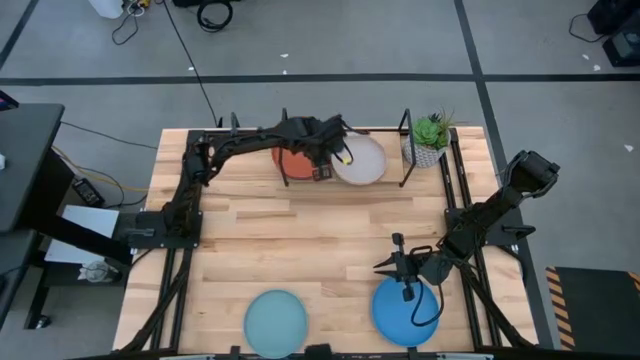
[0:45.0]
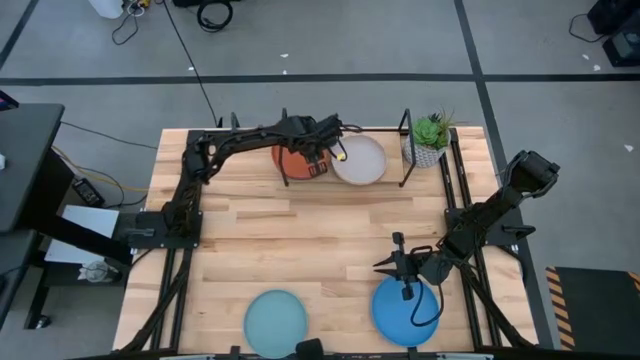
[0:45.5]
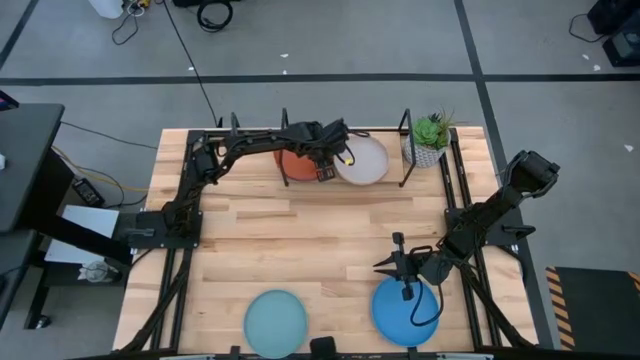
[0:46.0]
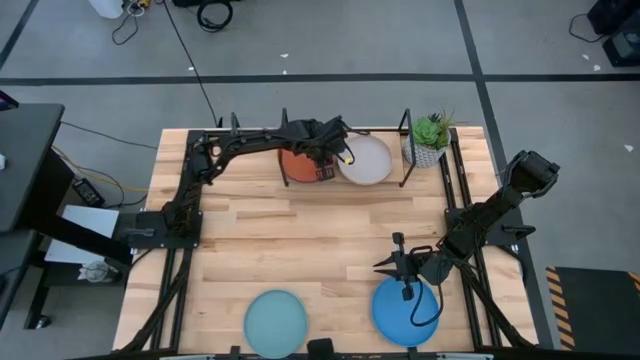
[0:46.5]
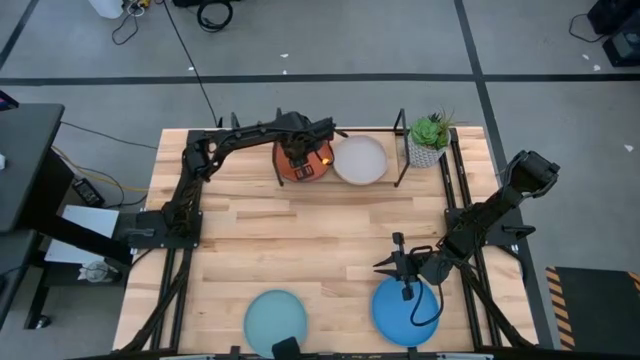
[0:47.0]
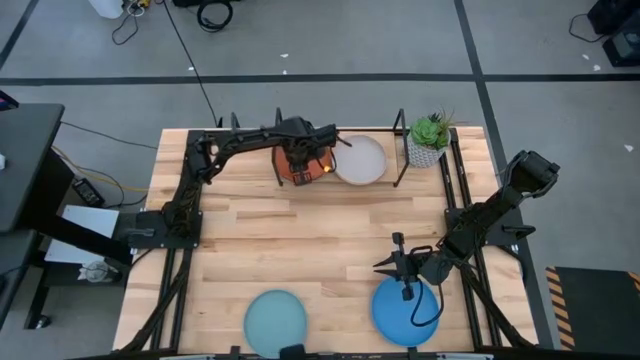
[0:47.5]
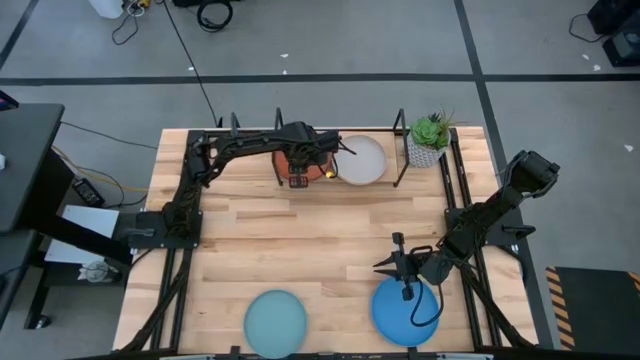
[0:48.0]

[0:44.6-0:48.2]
Task: Place and stack plates onto a shelf
Adjust the orange plate

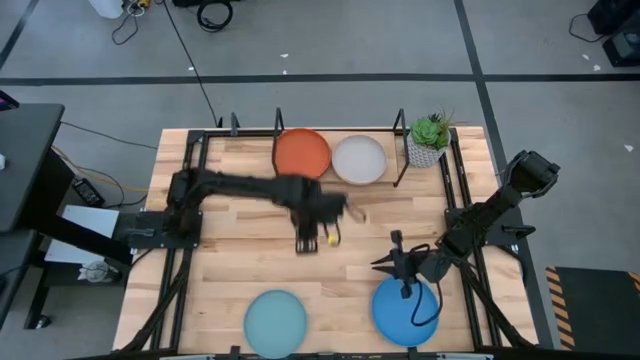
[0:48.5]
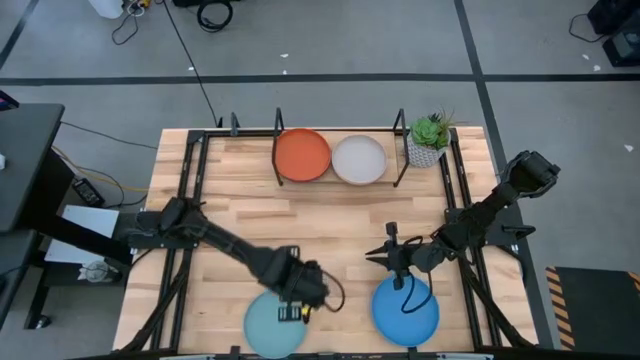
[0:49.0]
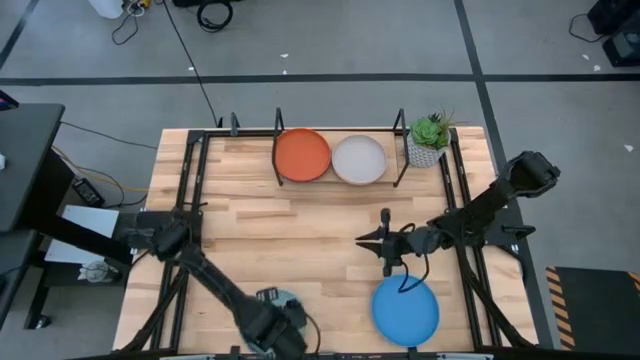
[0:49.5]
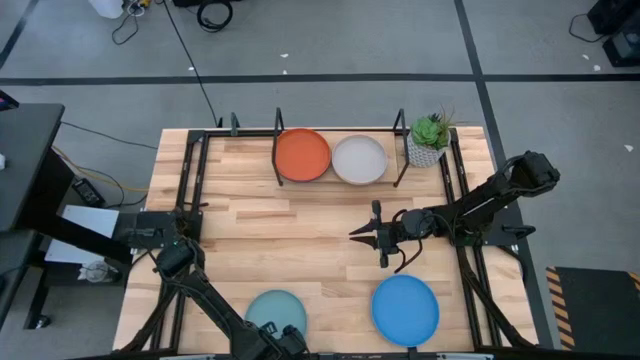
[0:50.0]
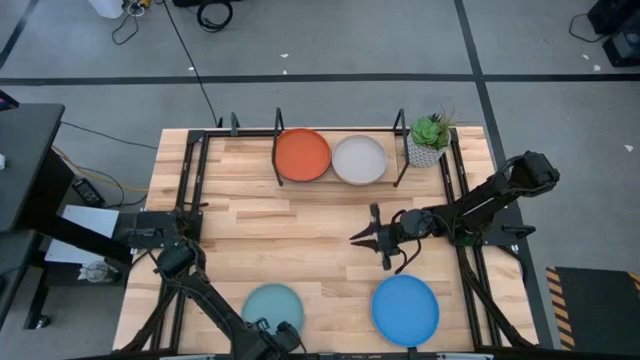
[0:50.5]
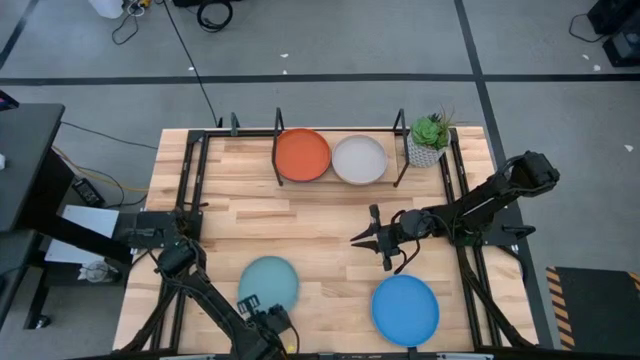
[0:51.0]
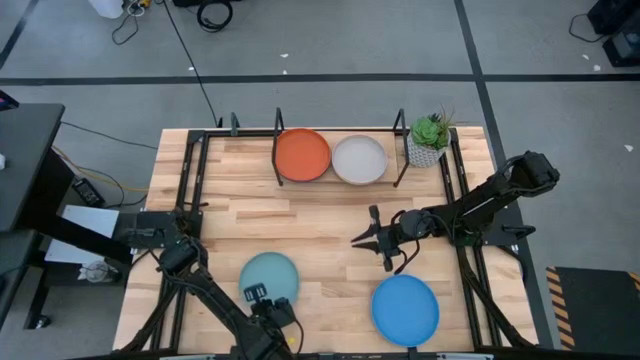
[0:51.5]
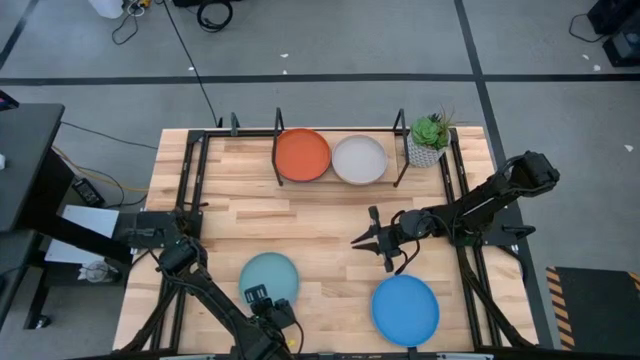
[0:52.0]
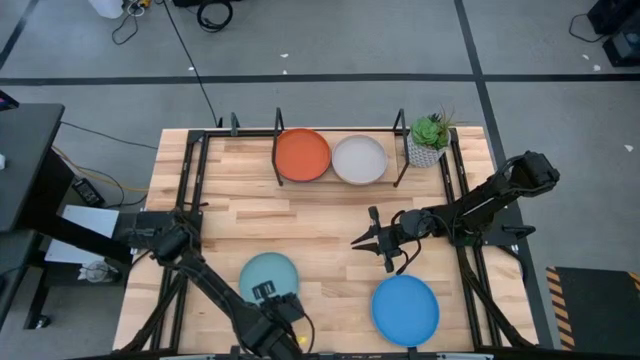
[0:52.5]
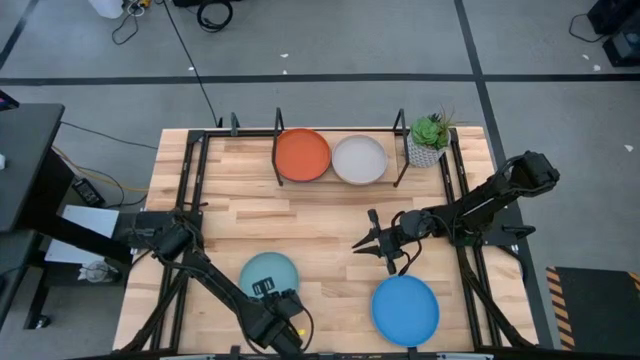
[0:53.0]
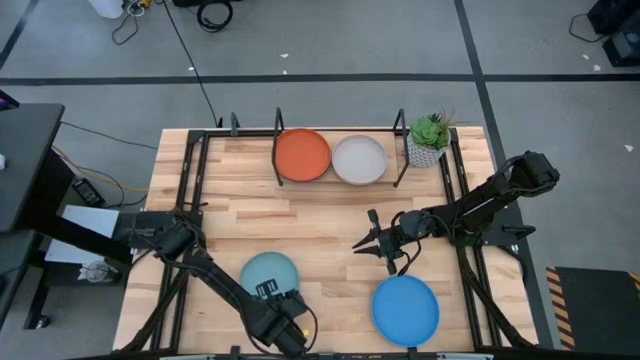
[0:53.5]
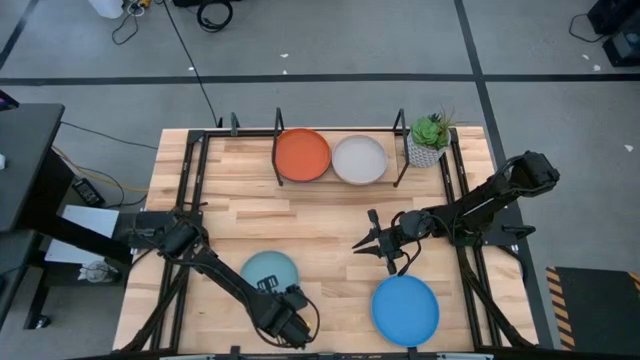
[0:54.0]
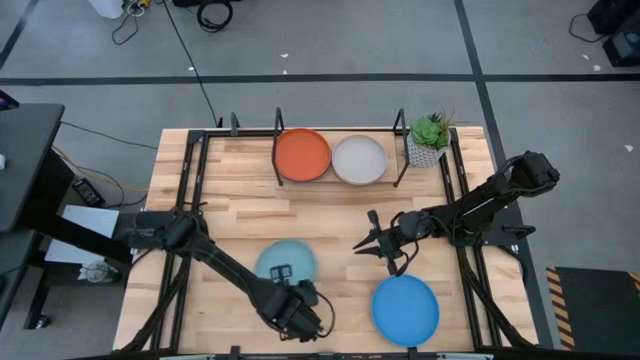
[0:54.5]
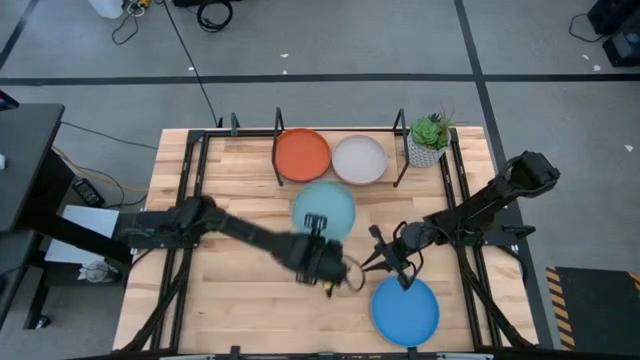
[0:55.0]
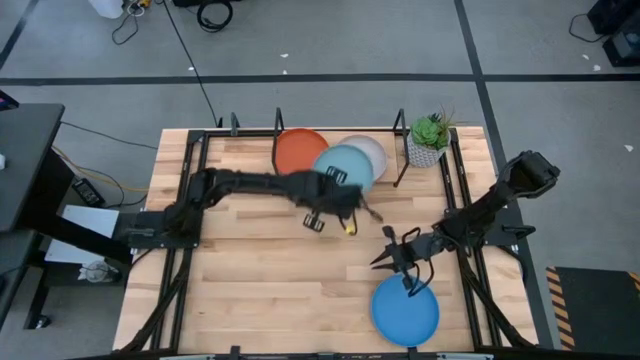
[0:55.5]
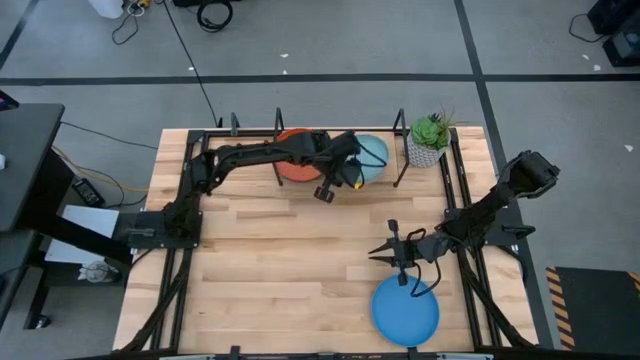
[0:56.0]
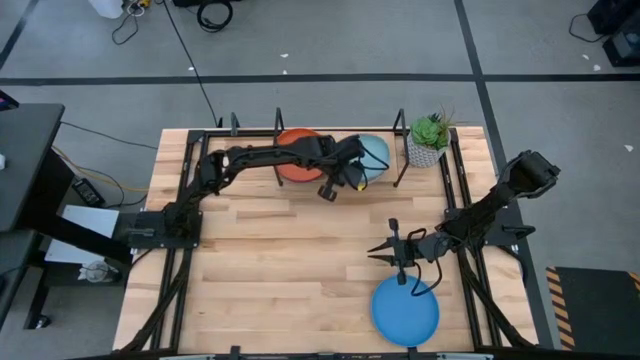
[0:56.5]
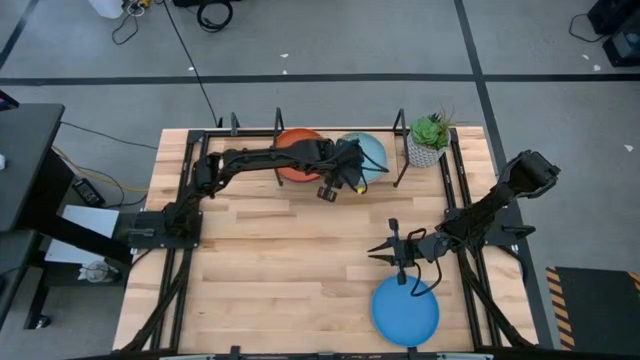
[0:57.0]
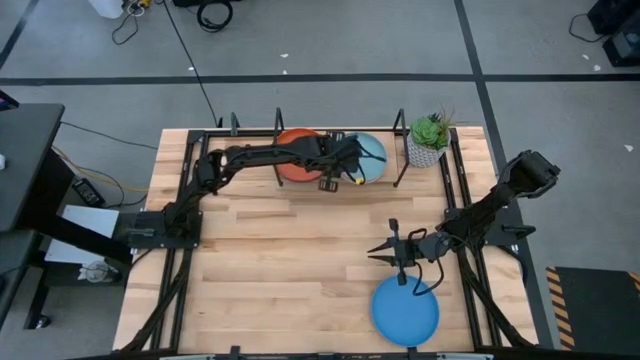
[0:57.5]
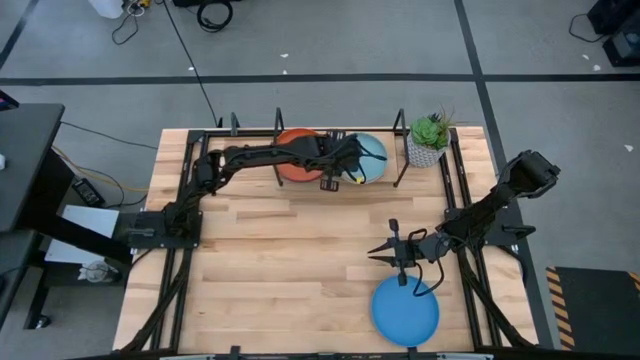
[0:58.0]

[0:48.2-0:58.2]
Stack the light blue plate on top of the gray plate on the shelf

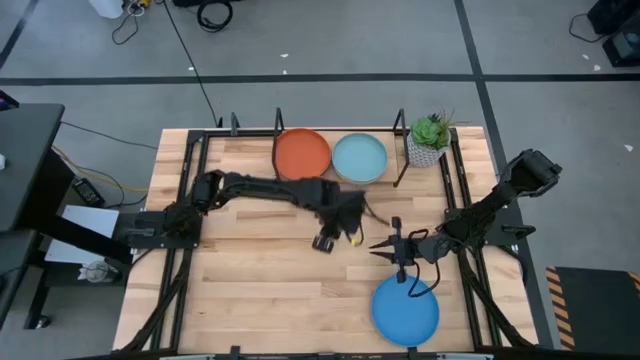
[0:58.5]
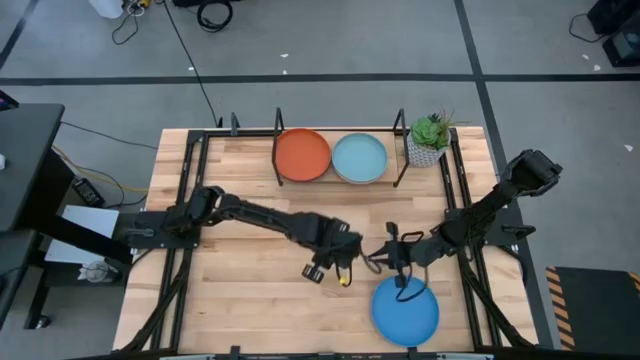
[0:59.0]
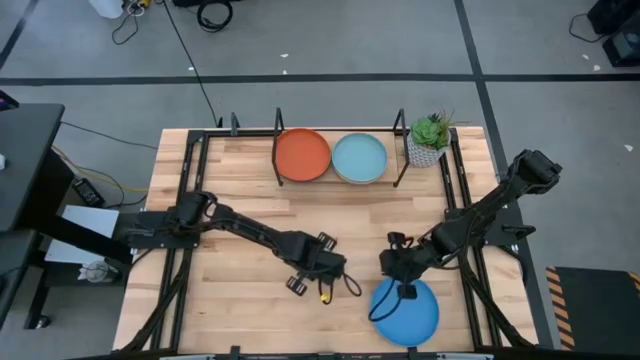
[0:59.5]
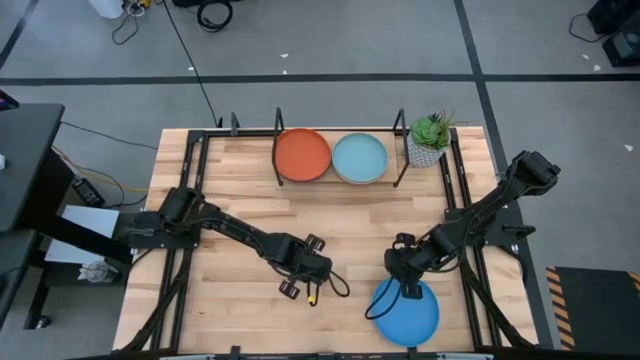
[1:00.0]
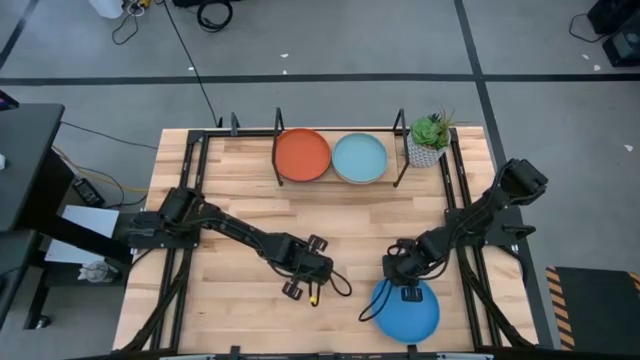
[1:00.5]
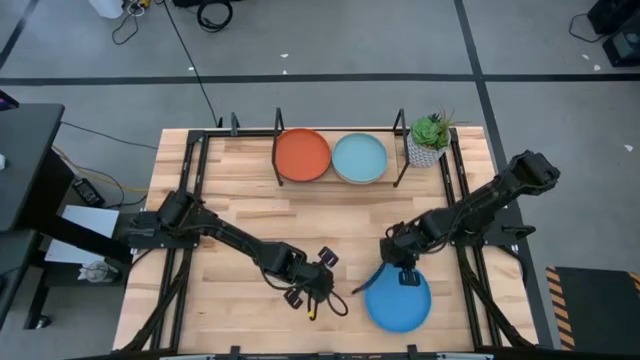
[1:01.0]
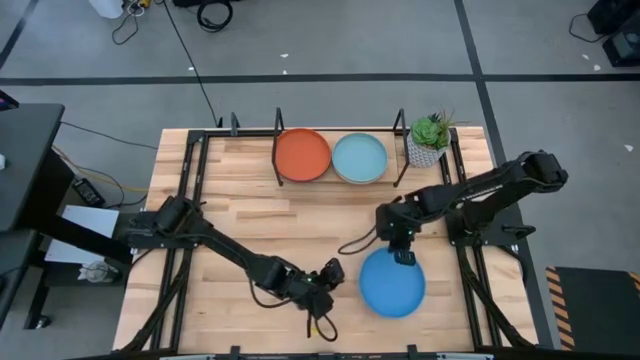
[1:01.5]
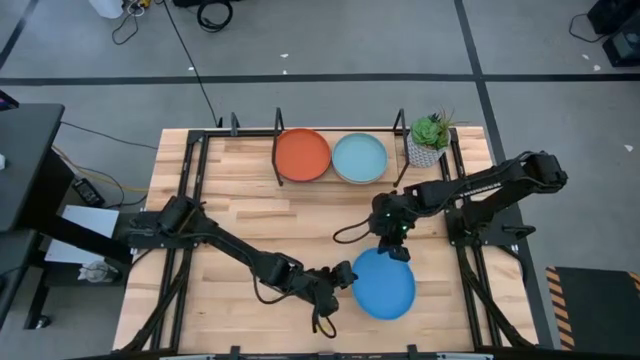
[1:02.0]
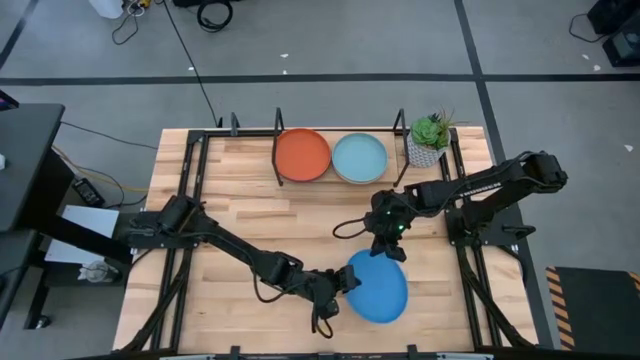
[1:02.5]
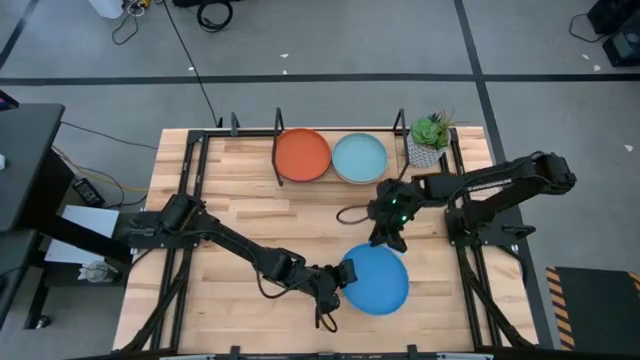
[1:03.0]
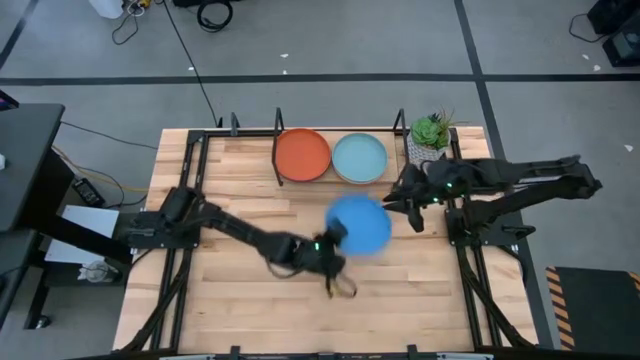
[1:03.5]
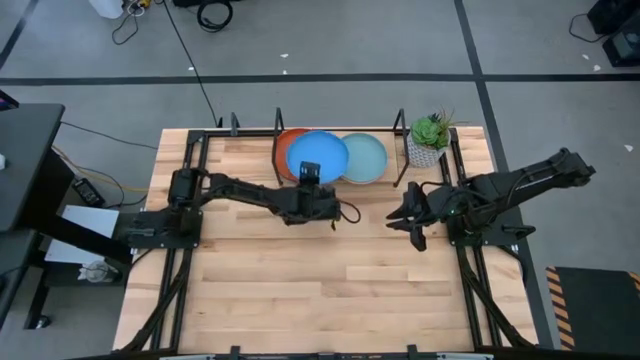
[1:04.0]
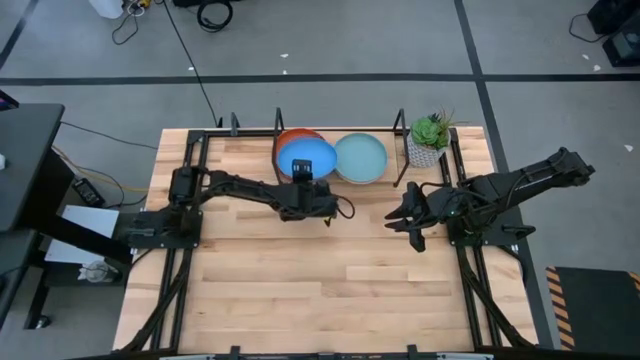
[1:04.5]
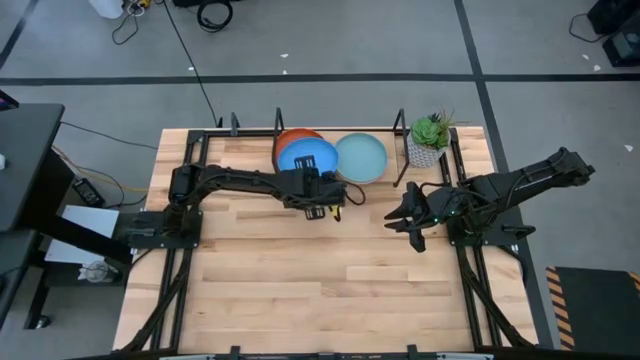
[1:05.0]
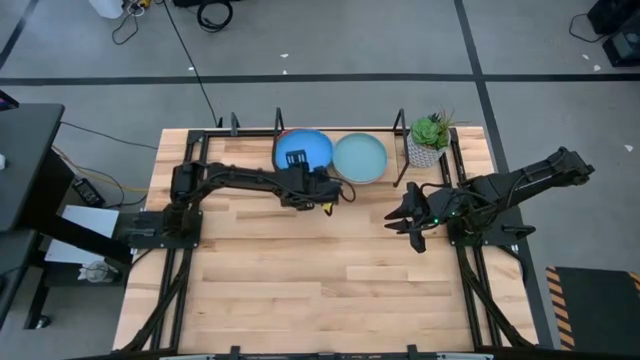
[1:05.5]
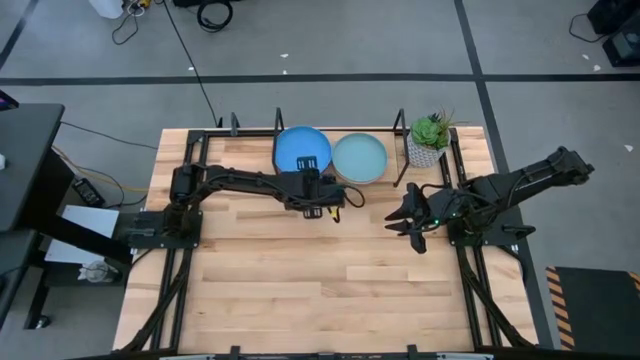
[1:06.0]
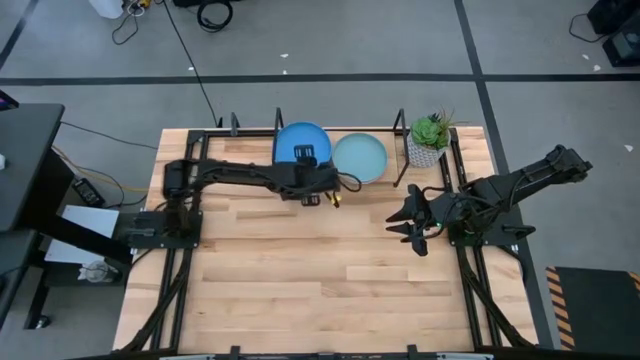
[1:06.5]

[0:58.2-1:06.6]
Stack the blue plate on top of the orange plate on the shelf
